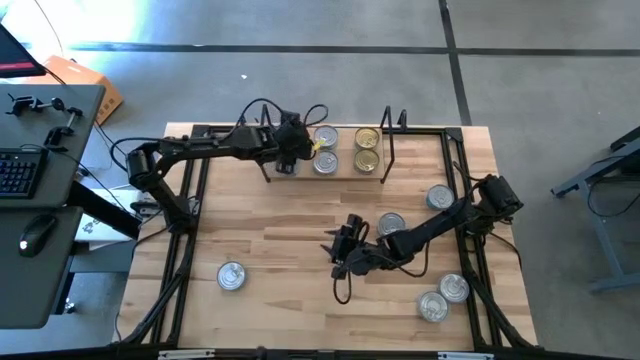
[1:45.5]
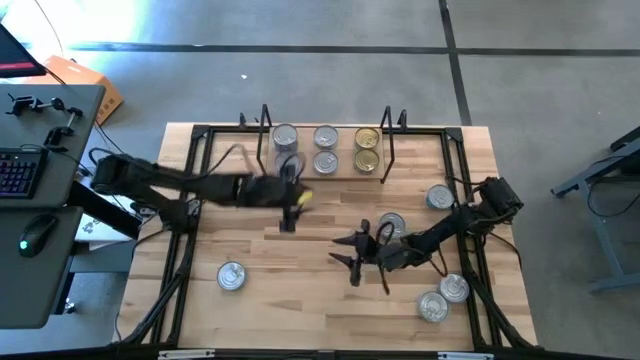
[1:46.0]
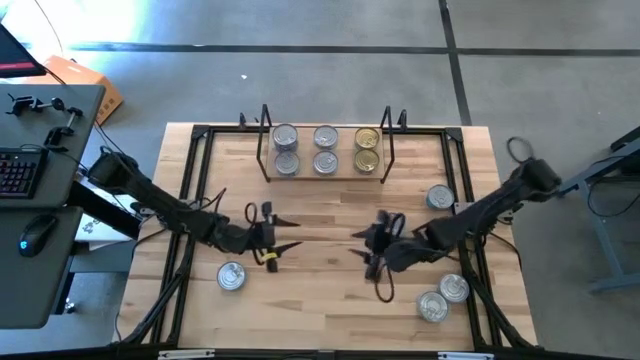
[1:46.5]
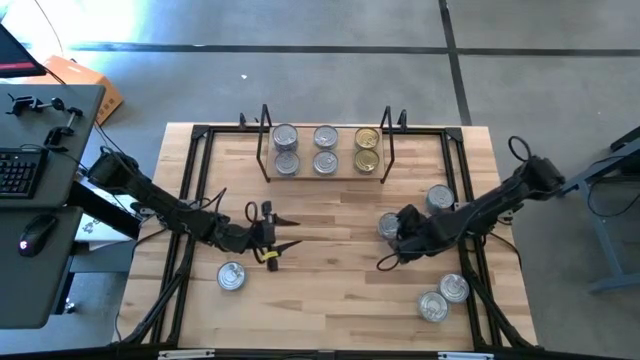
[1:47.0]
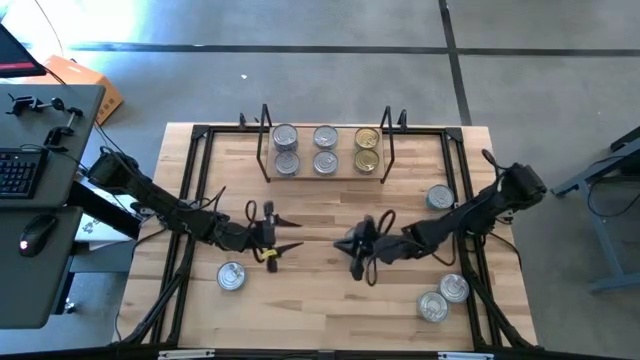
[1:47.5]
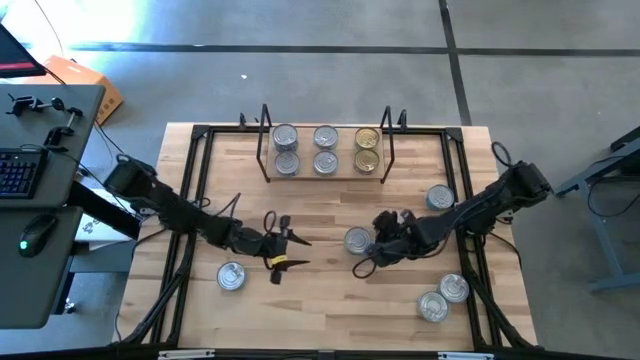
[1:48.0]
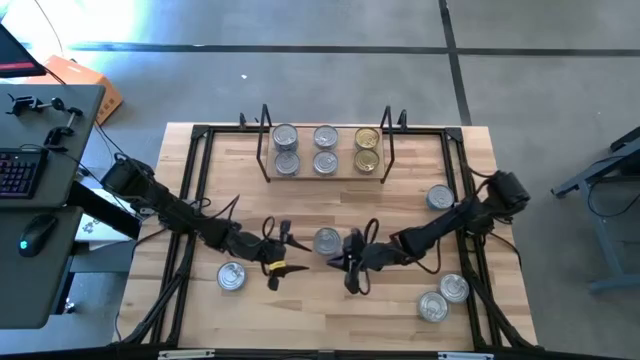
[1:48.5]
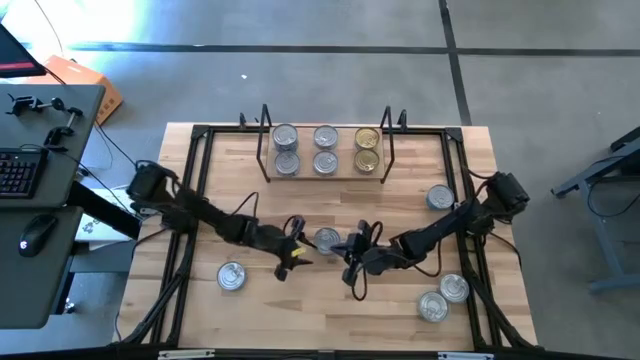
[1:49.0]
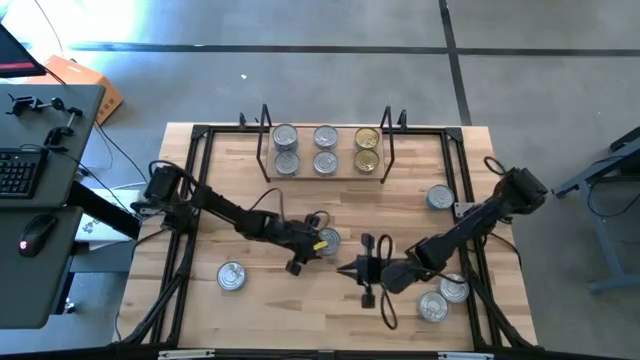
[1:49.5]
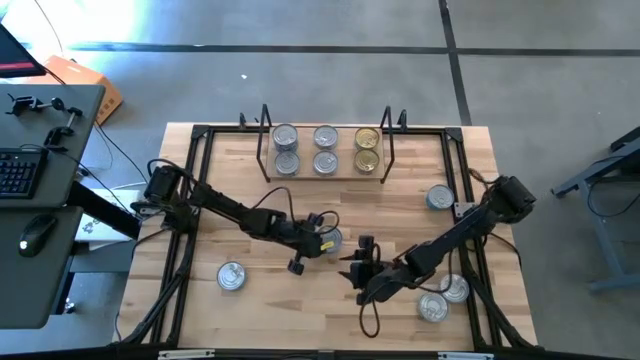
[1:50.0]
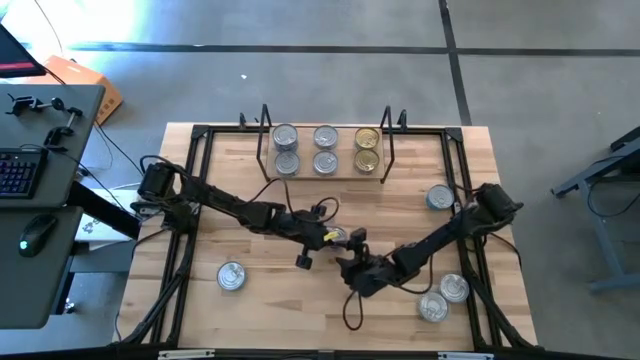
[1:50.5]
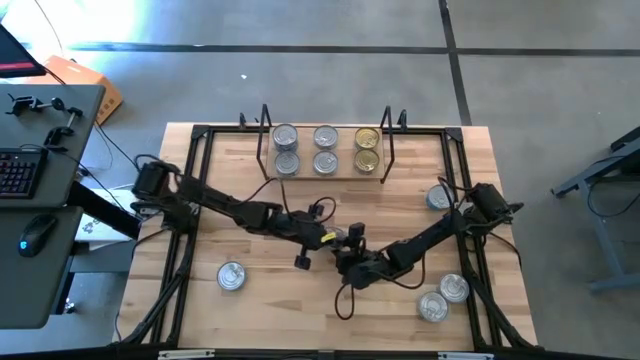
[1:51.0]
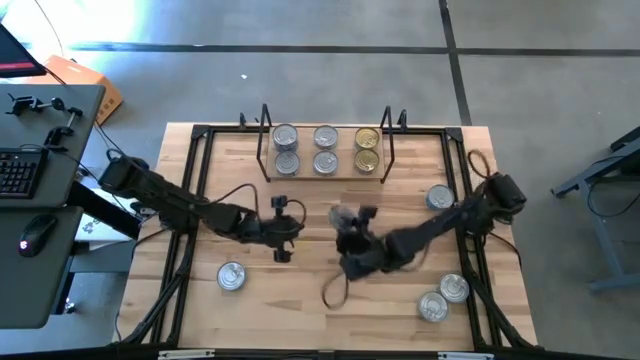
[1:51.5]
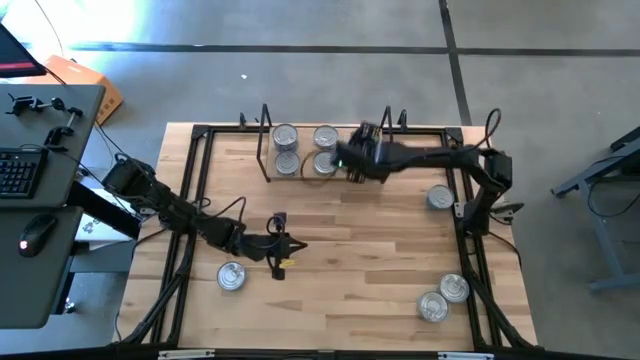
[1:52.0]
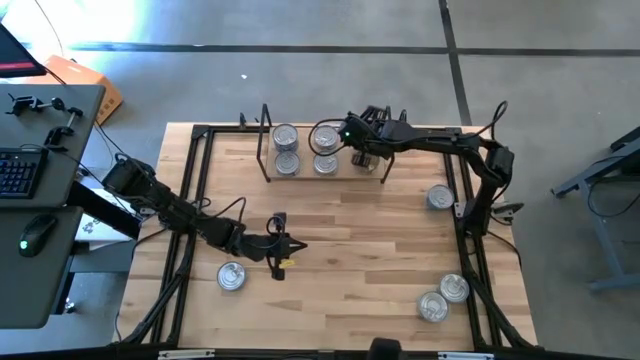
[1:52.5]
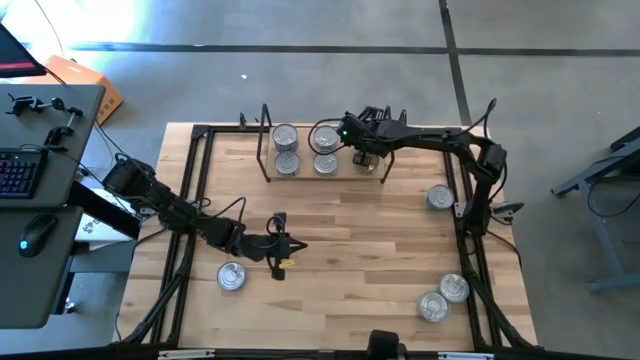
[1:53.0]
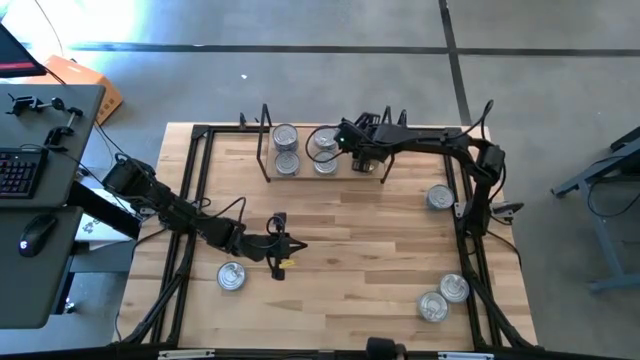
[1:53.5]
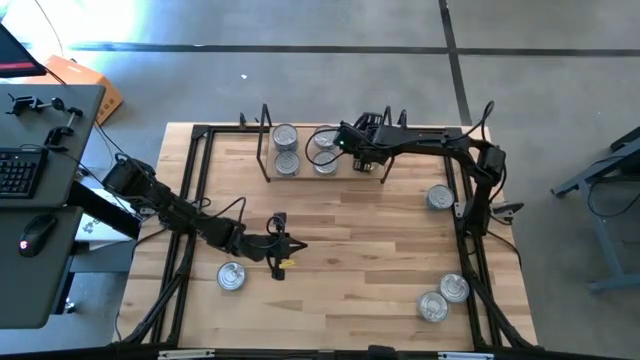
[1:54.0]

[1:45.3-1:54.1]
Task: Stack canned seafood by type on shelf
Stack the green tuna can on top of the other green tuna can on the shelf

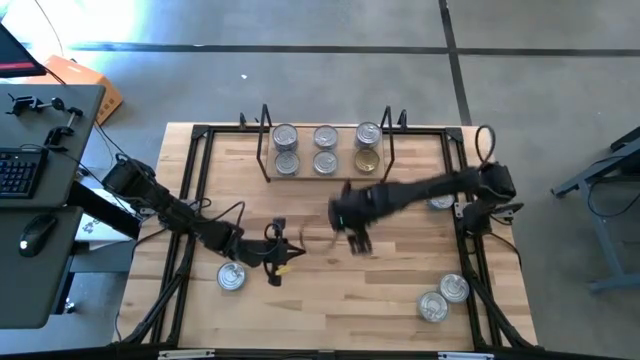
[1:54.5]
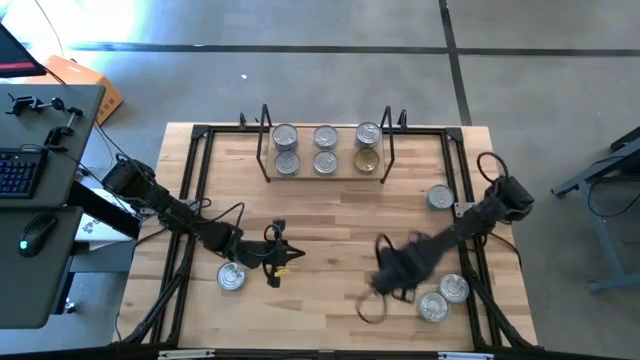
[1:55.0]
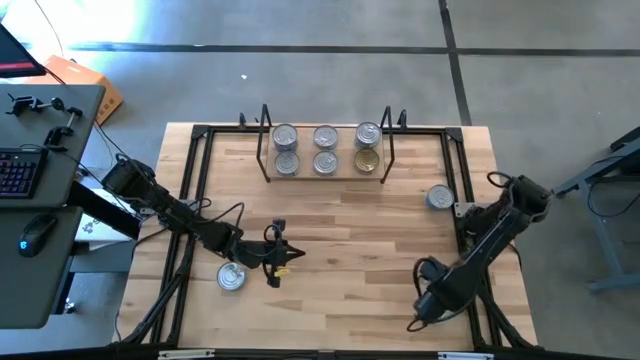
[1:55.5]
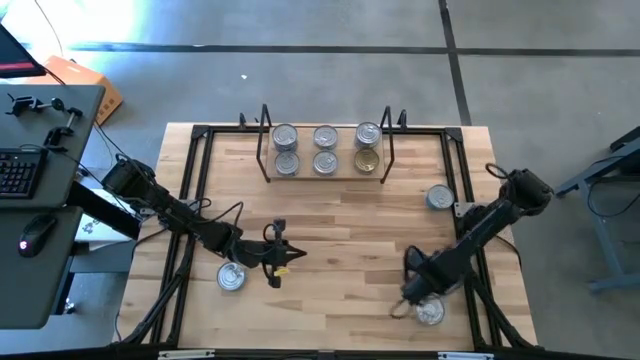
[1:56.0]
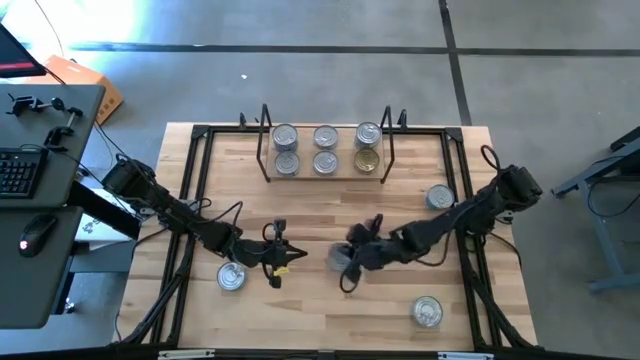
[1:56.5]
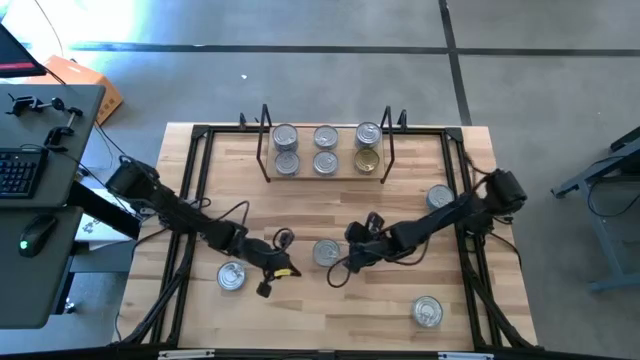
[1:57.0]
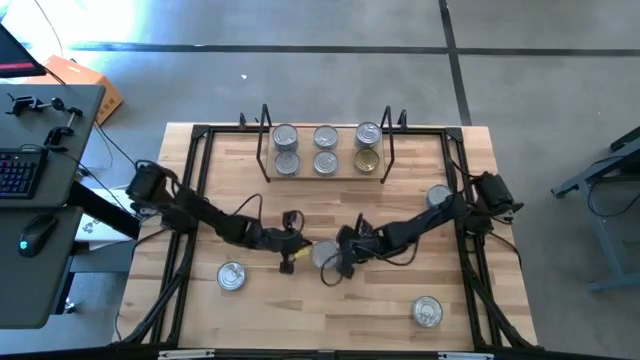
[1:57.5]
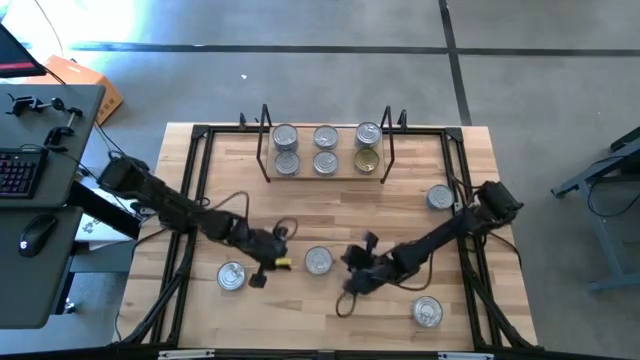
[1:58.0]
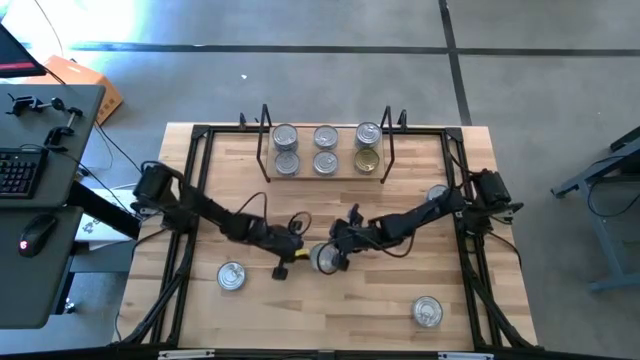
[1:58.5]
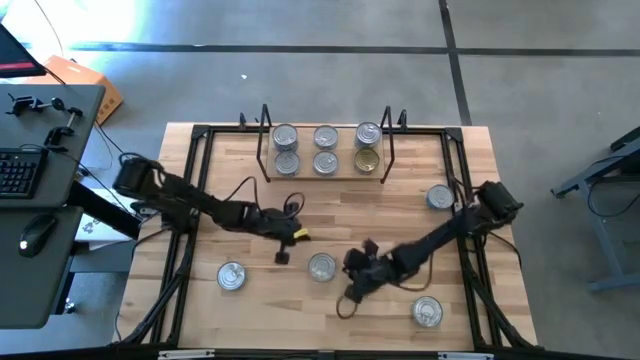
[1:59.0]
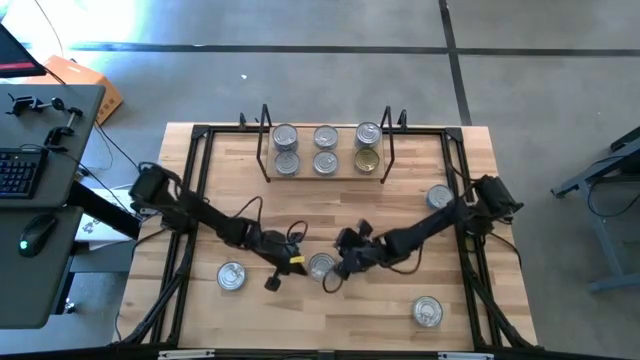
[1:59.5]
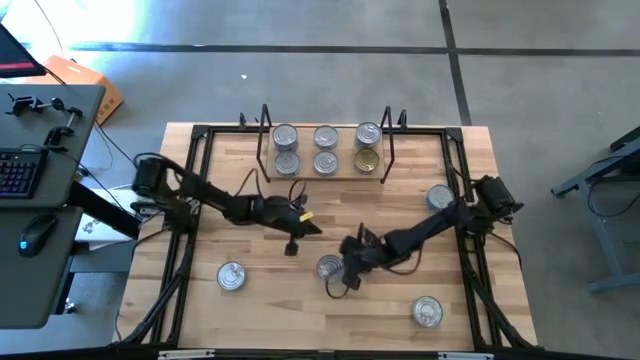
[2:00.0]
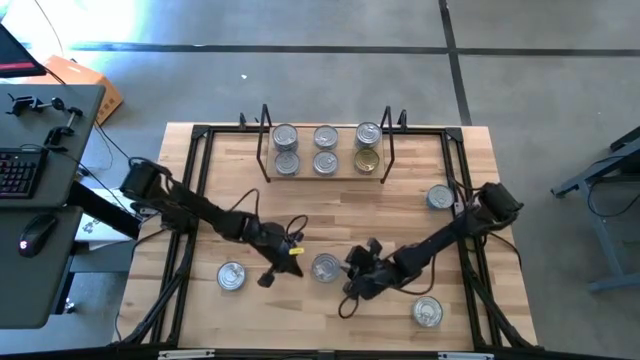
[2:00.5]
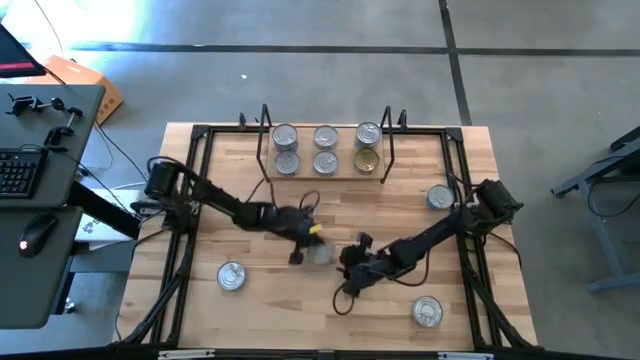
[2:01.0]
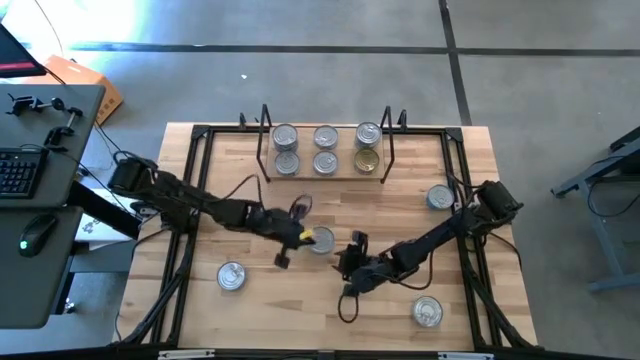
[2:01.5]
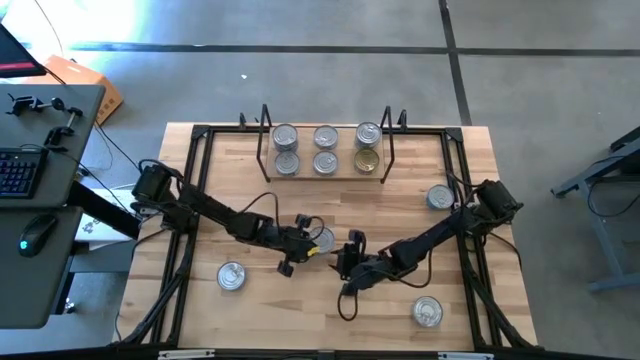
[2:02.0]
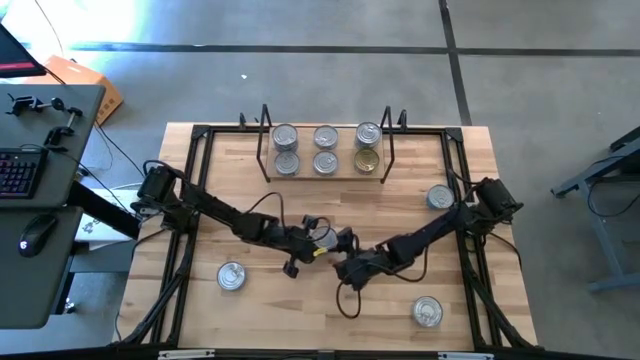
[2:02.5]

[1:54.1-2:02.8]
Stack the green tuna can on top of the other green tuna can on the shelf

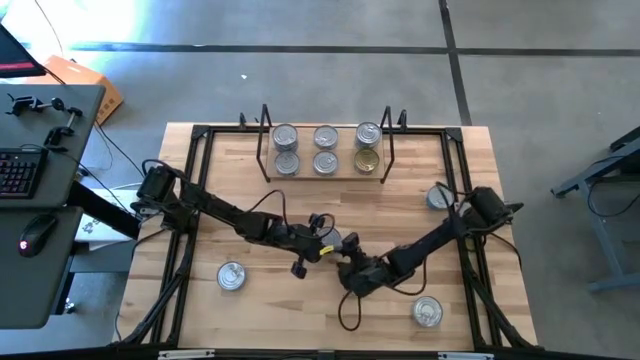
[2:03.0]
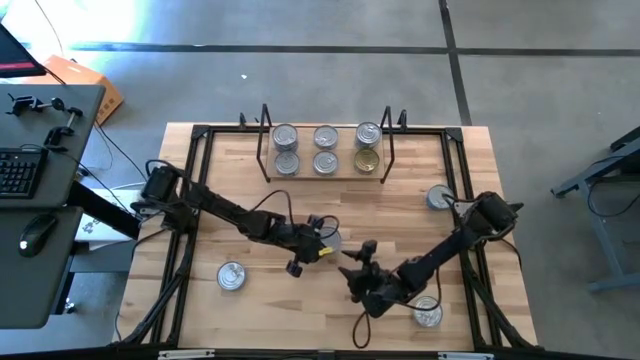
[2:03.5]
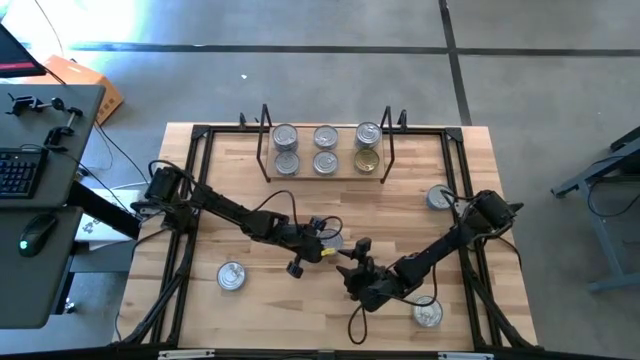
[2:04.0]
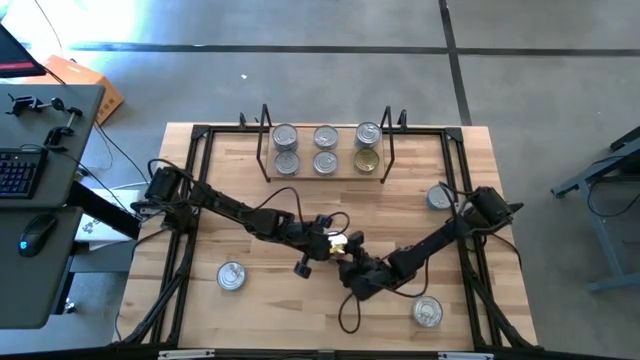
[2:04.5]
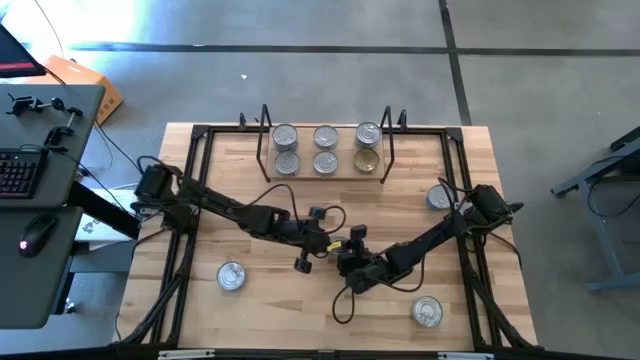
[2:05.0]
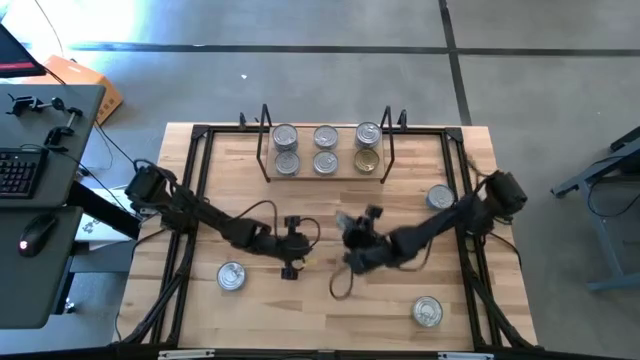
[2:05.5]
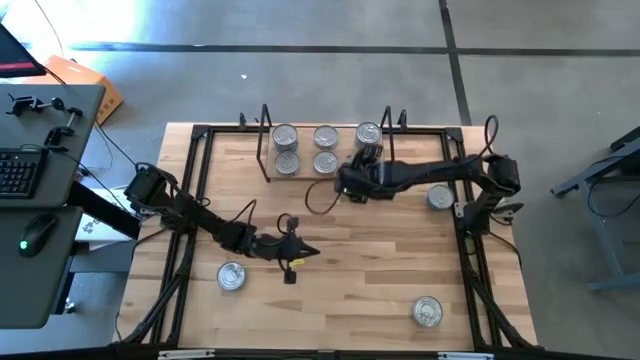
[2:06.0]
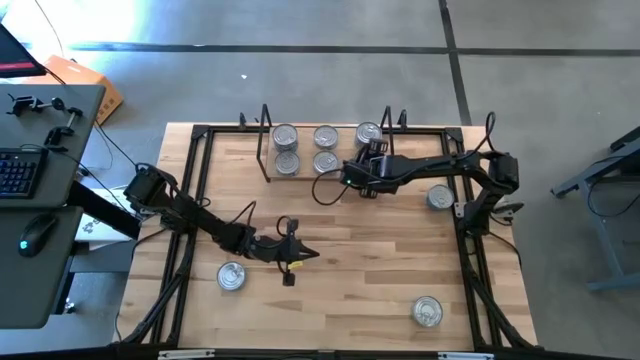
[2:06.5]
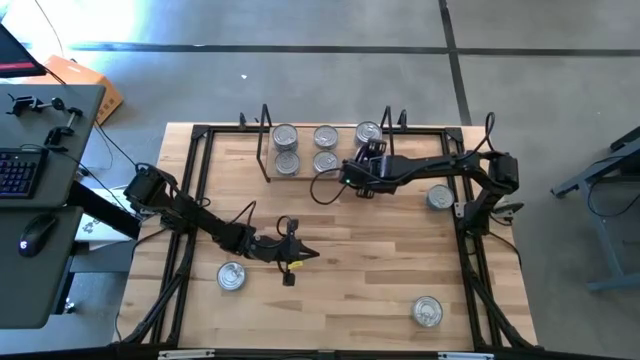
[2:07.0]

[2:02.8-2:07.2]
Stack the green tuna can on top of the other green tuna can on the shelf
